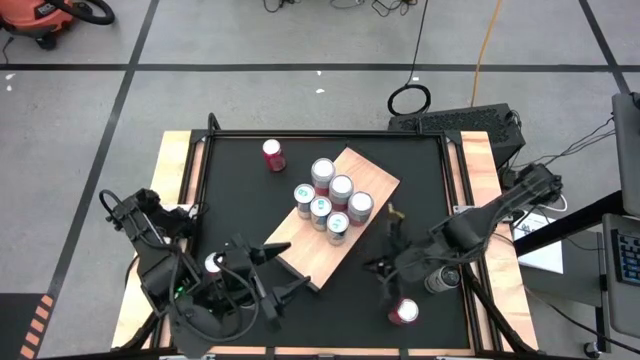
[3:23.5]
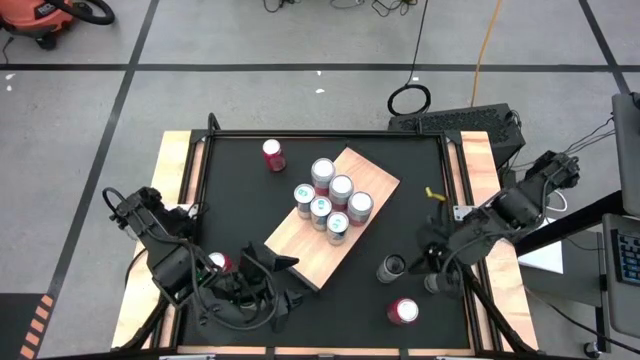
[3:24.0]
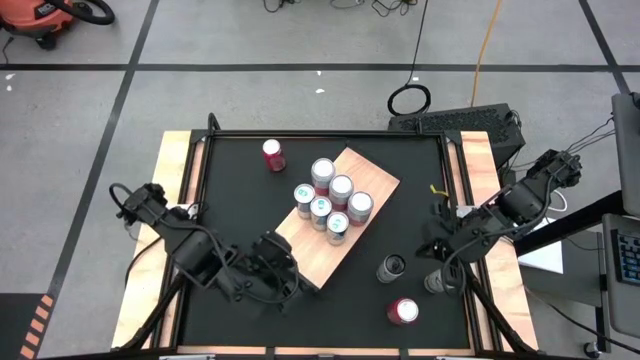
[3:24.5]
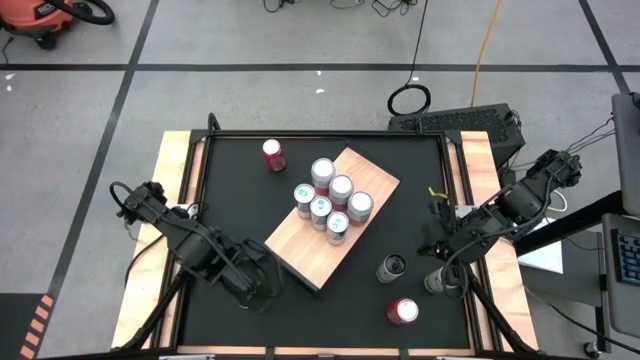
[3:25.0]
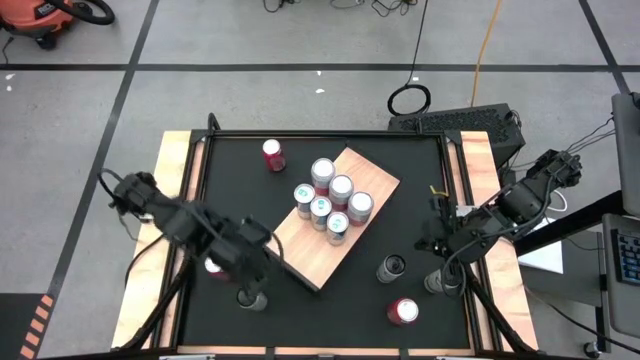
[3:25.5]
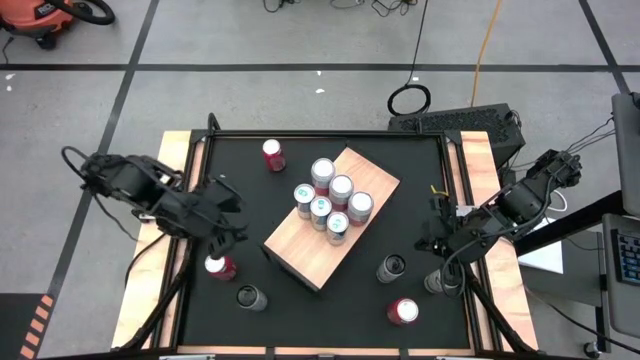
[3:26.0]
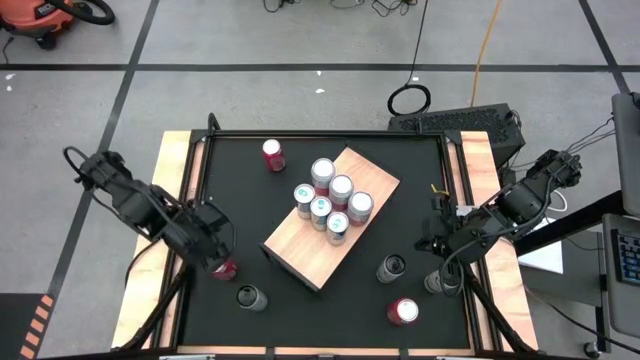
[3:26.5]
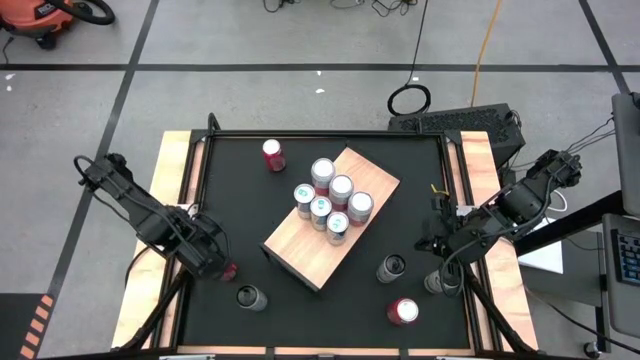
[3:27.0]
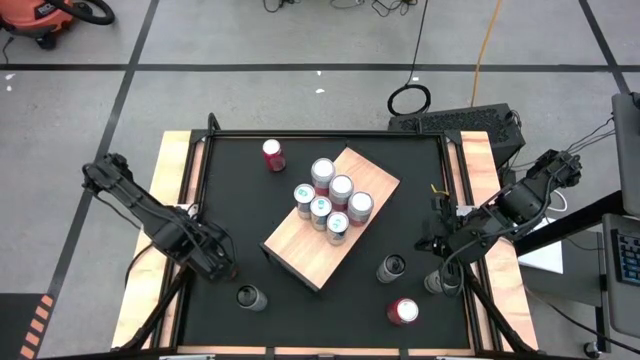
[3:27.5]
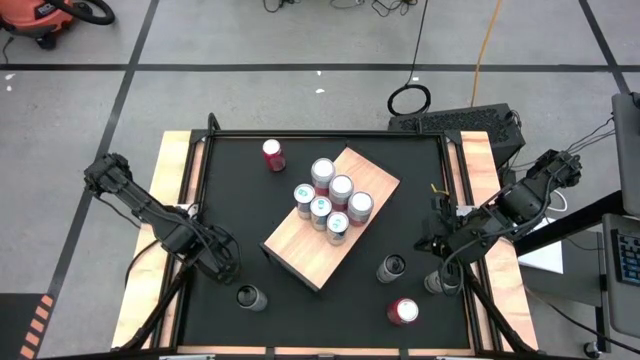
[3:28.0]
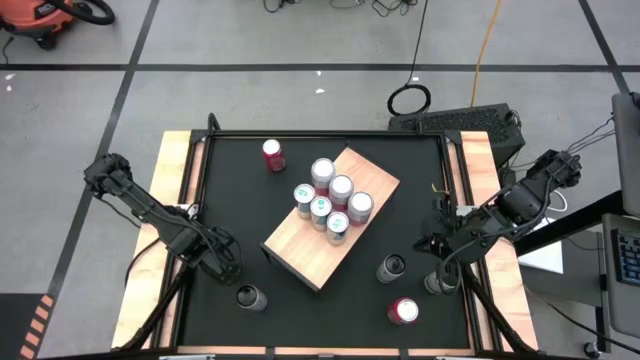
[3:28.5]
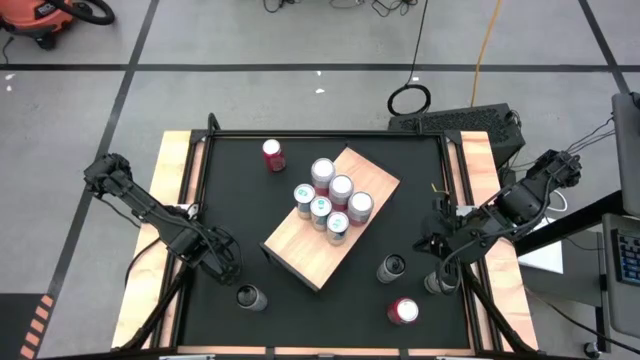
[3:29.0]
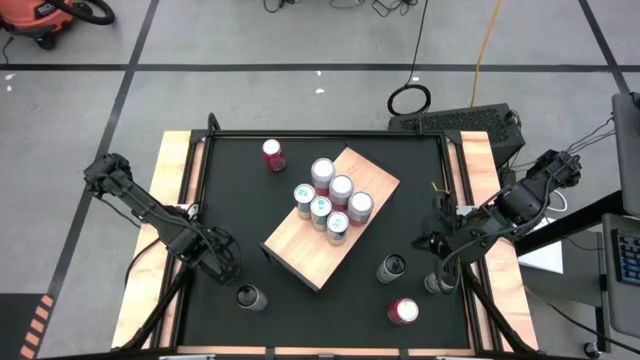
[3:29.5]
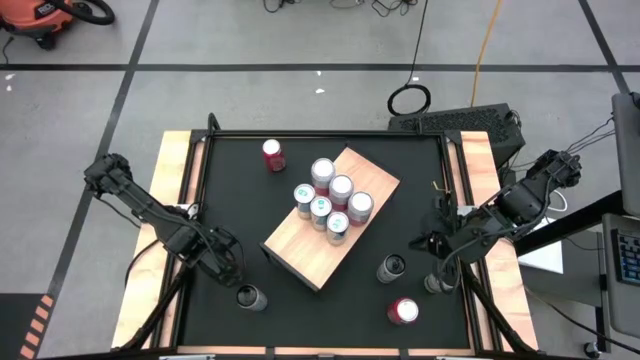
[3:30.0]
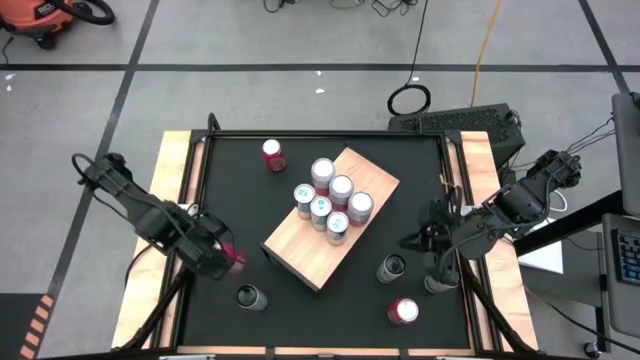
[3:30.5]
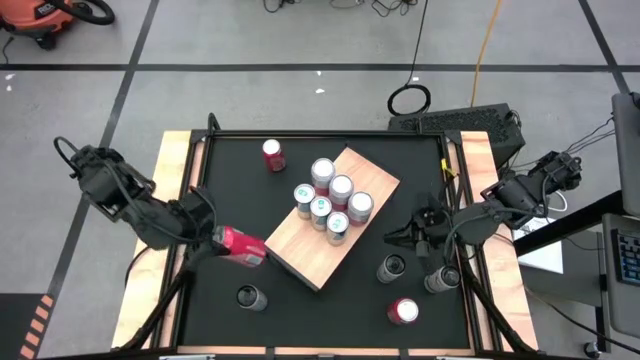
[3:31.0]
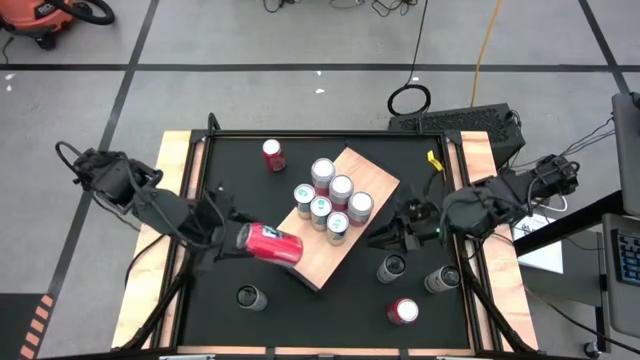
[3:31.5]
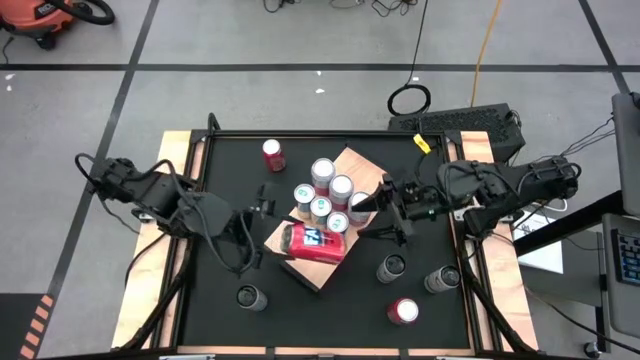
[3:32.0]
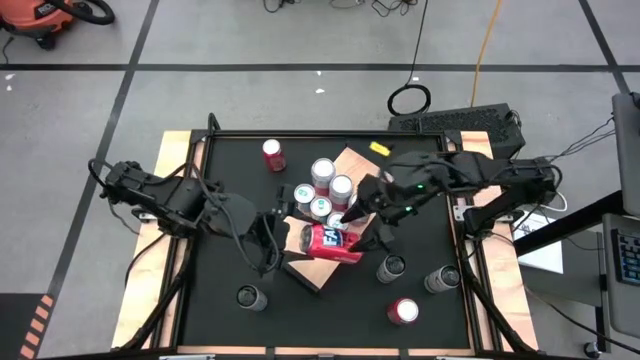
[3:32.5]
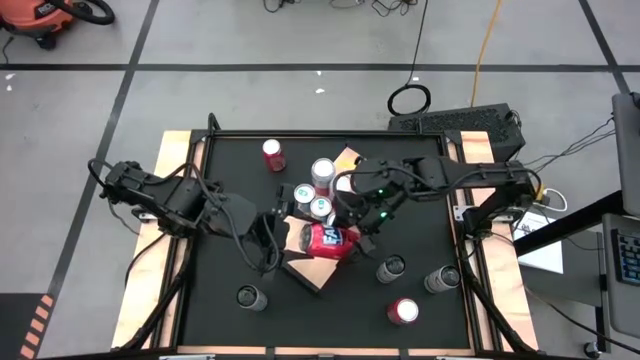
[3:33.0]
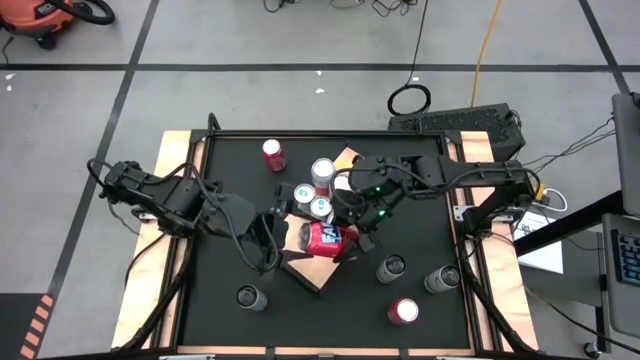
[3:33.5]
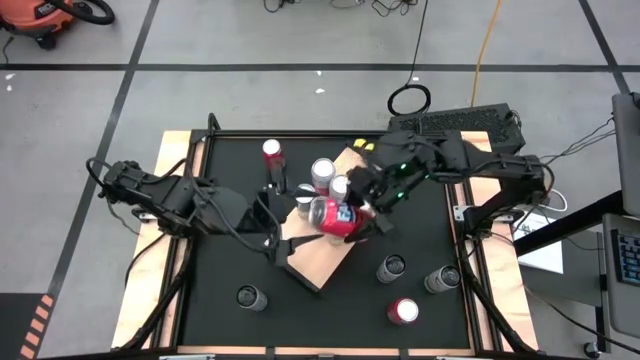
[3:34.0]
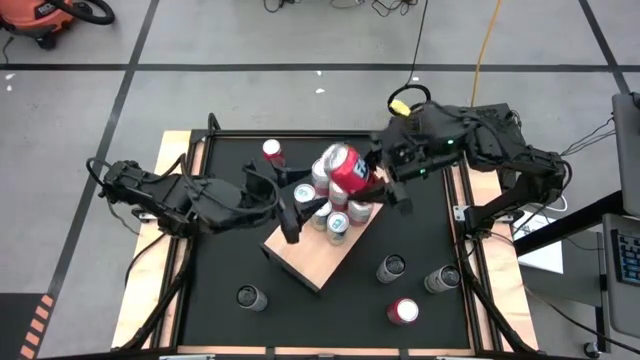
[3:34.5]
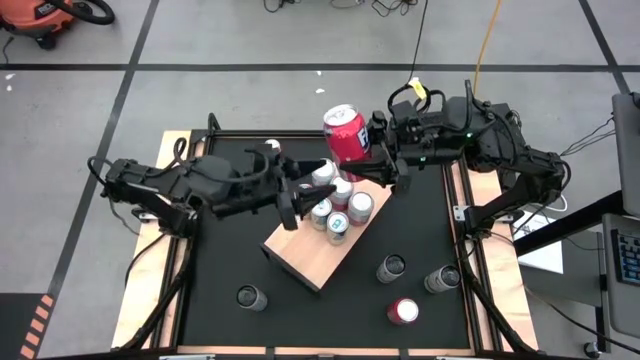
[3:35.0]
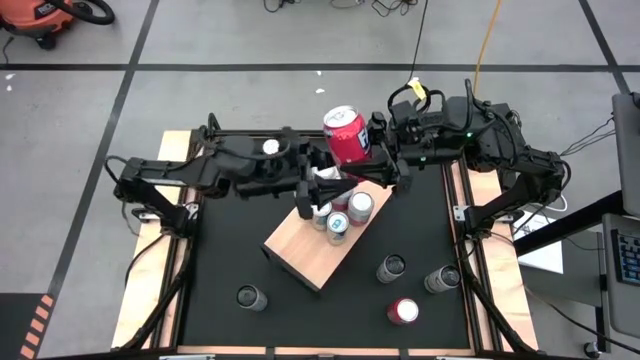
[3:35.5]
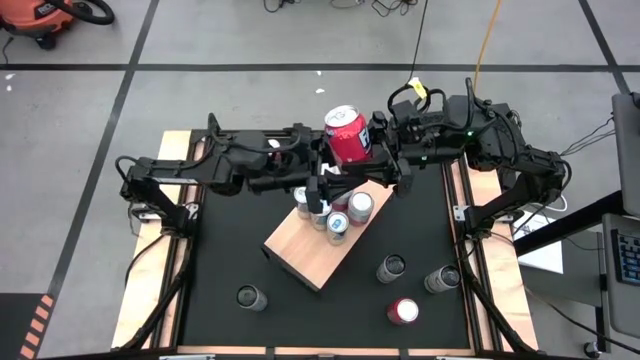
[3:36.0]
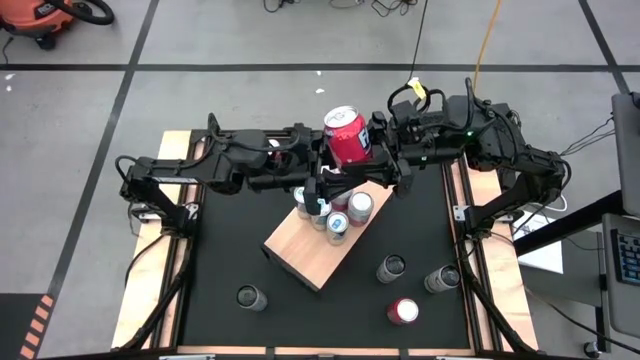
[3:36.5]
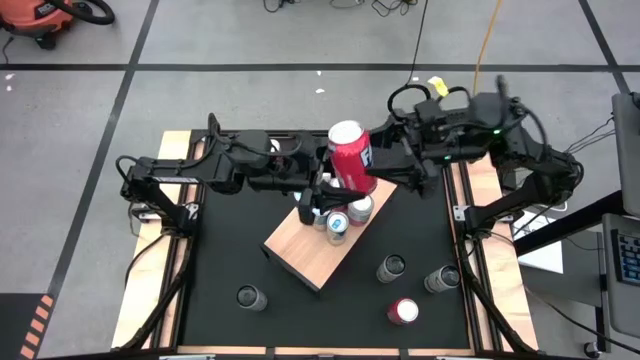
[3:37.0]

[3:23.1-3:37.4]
Task: Place canned beverage on shelf
Put the middle red soda can on the shelf

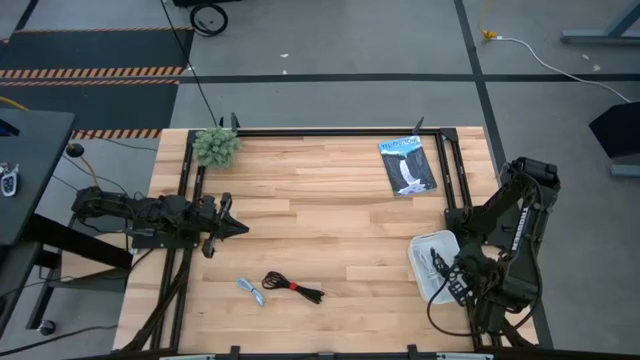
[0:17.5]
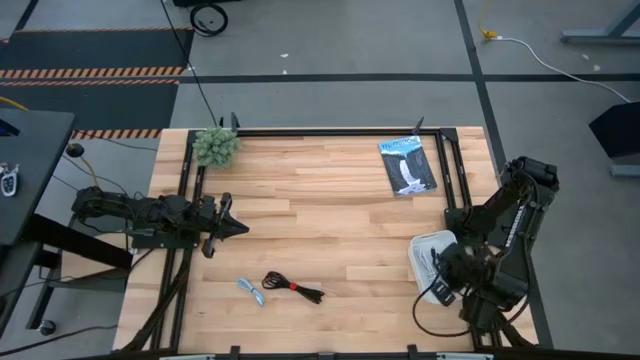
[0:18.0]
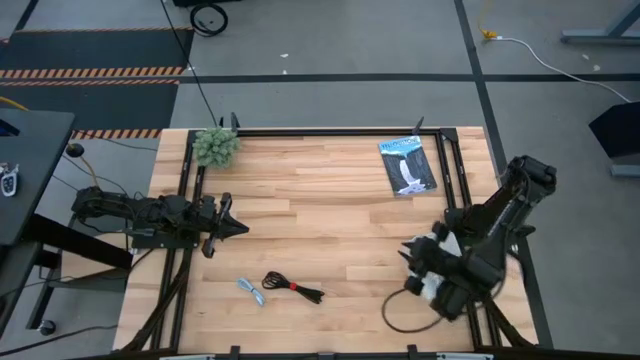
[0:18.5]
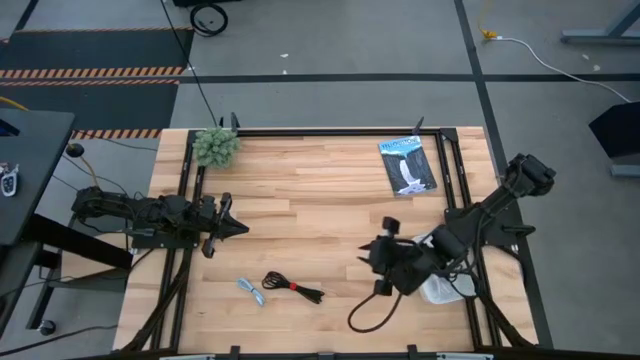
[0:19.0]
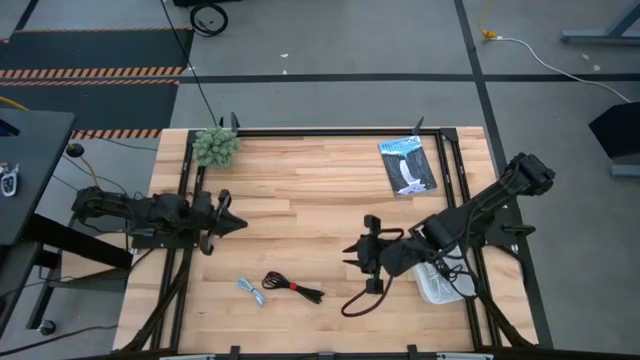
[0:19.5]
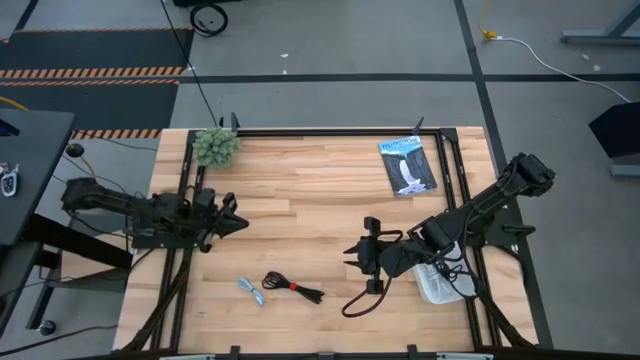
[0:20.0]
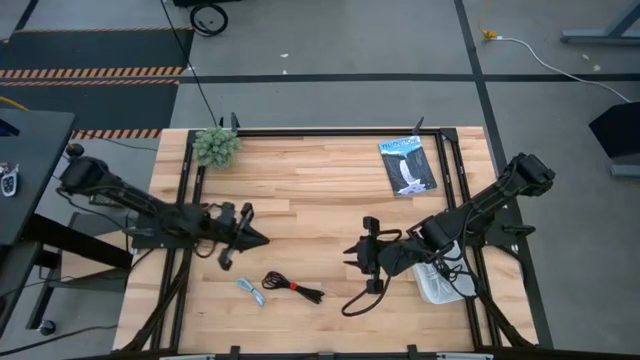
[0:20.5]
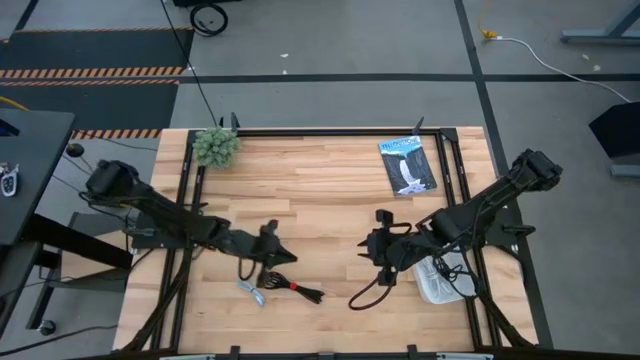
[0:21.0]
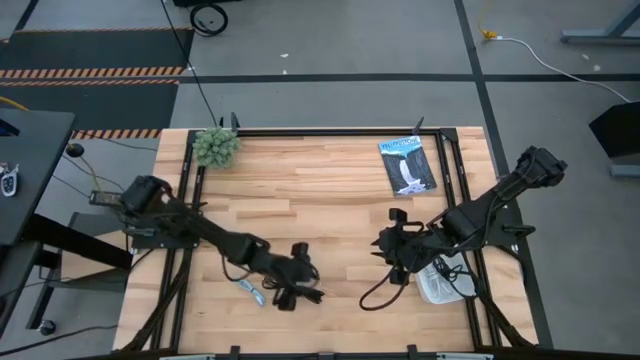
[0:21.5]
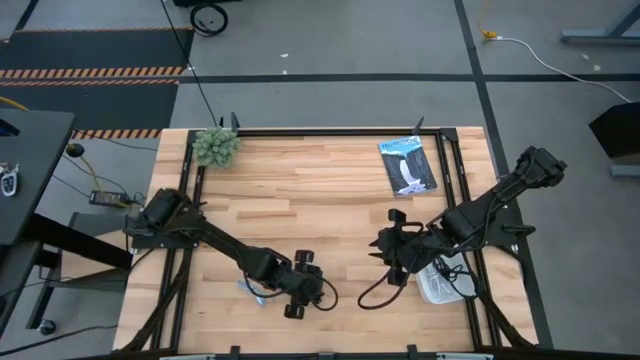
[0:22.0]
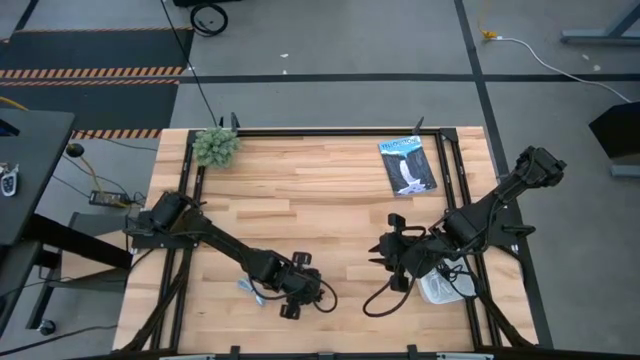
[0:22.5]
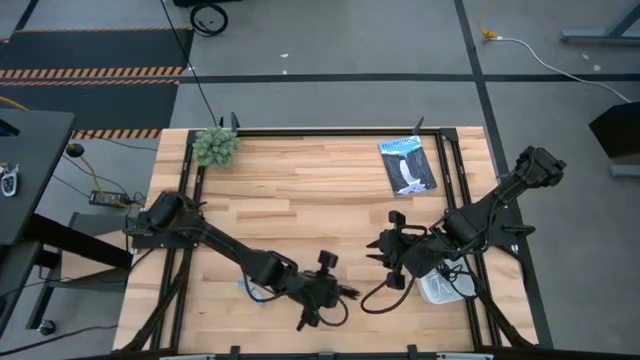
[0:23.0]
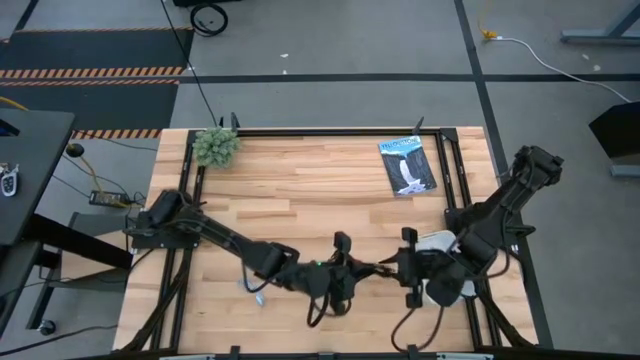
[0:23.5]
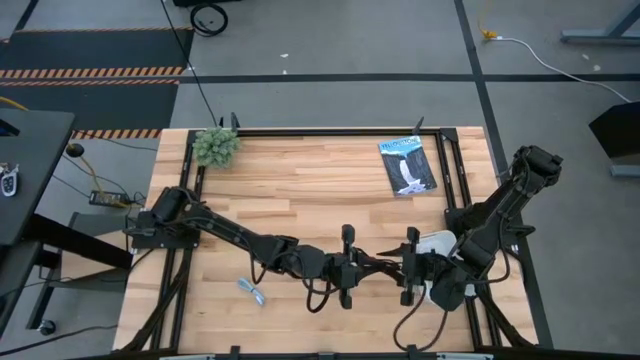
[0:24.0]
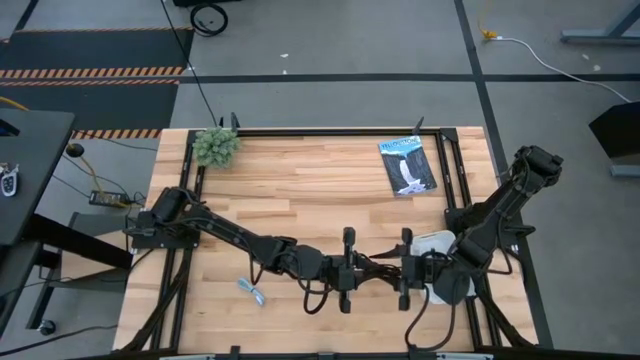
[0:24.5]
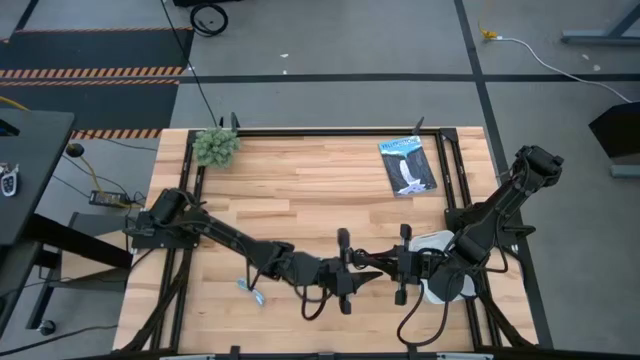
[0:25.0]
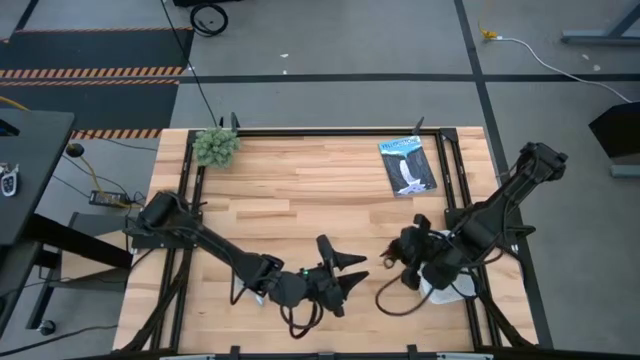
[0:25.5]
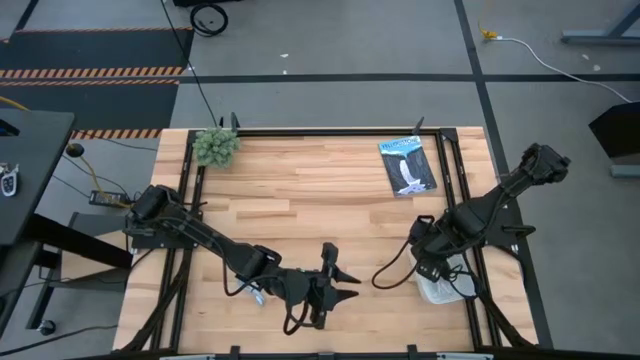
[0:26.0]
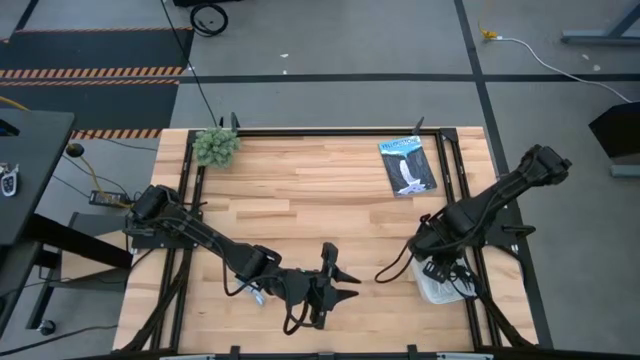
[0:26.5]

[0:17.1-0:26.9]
Task: Pick and place USB-C Cables
Put the black charger cable into the white container
